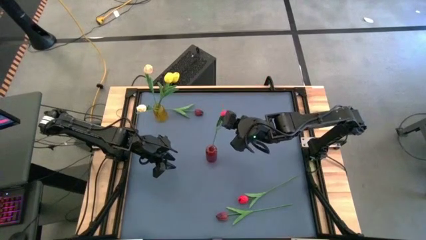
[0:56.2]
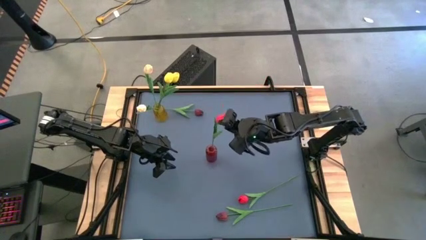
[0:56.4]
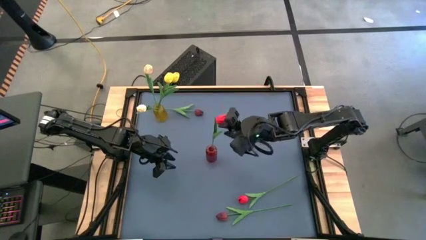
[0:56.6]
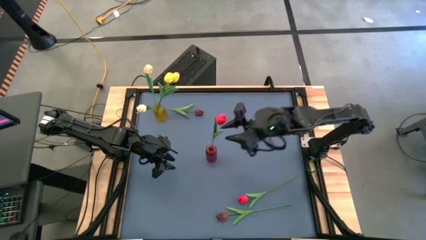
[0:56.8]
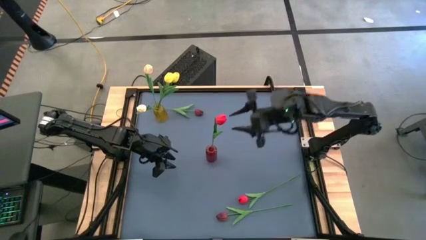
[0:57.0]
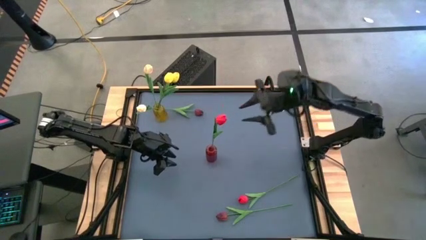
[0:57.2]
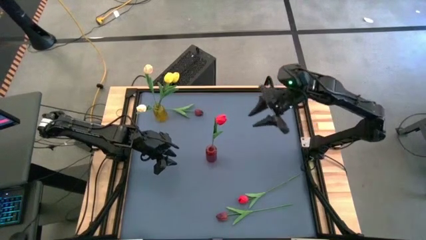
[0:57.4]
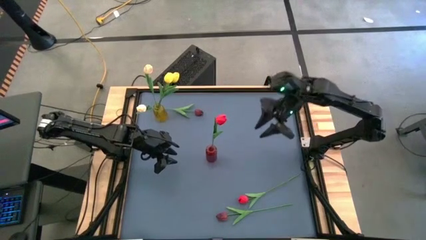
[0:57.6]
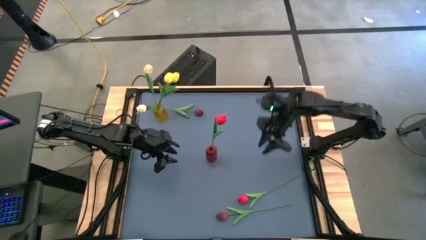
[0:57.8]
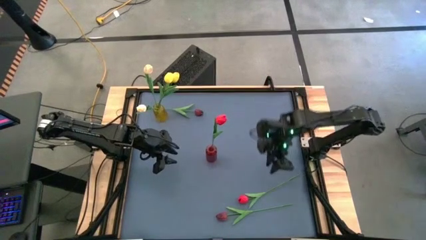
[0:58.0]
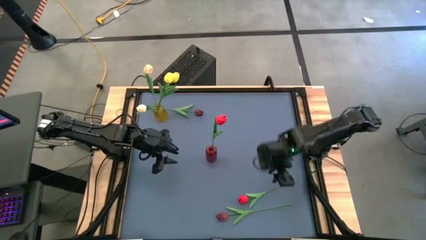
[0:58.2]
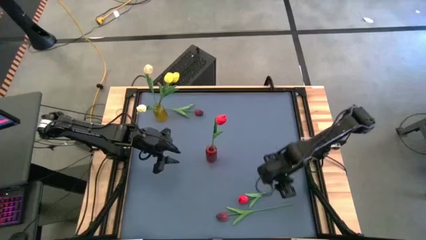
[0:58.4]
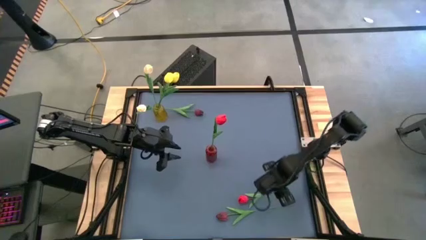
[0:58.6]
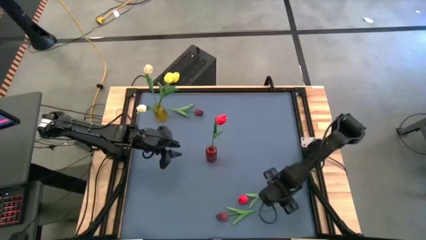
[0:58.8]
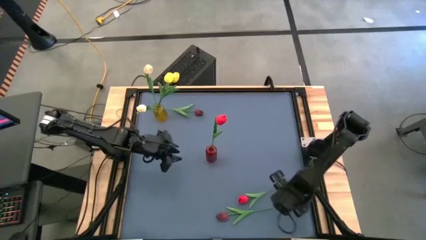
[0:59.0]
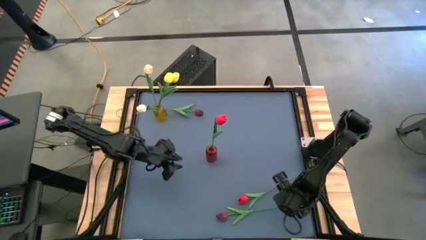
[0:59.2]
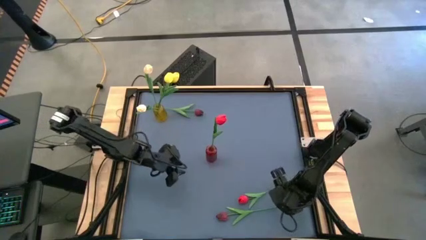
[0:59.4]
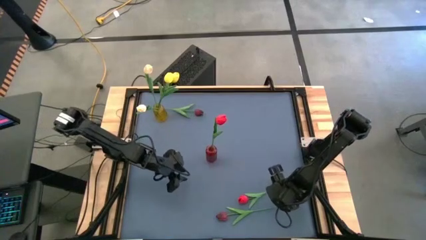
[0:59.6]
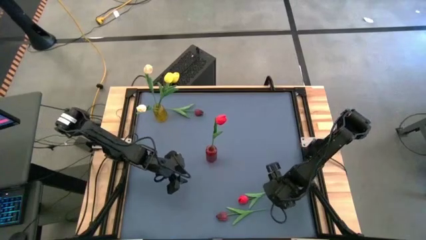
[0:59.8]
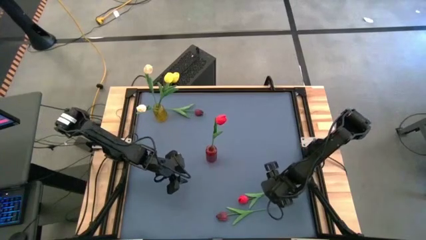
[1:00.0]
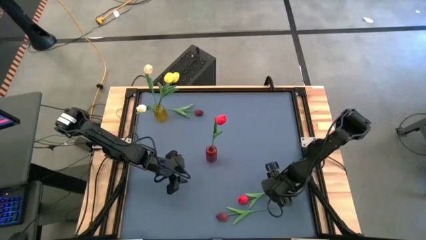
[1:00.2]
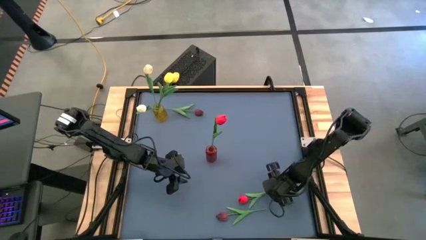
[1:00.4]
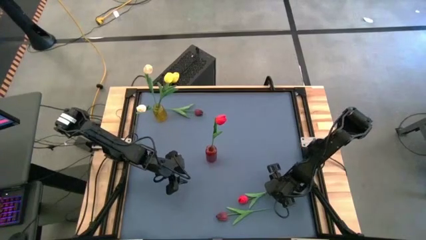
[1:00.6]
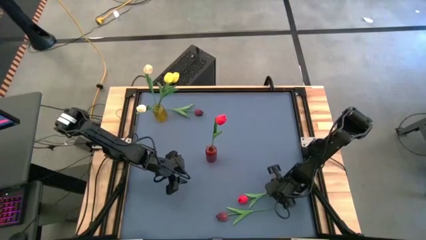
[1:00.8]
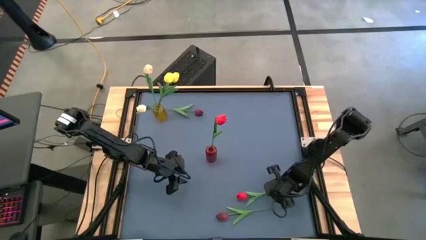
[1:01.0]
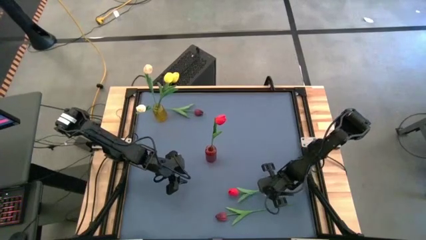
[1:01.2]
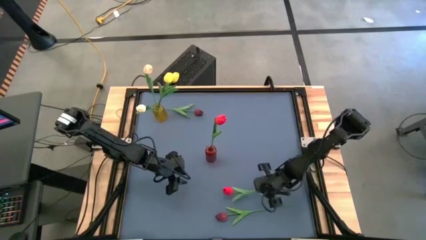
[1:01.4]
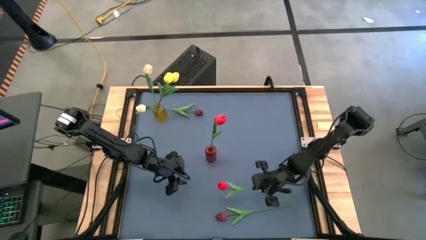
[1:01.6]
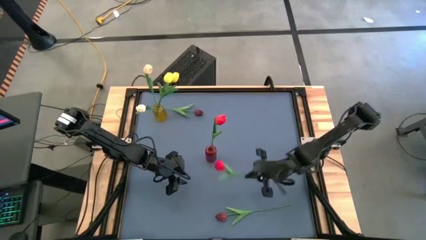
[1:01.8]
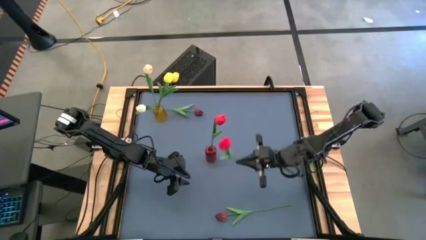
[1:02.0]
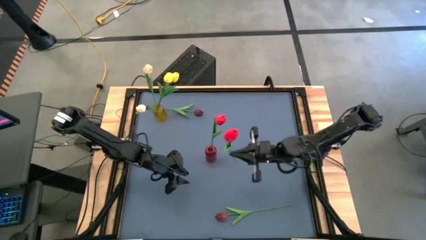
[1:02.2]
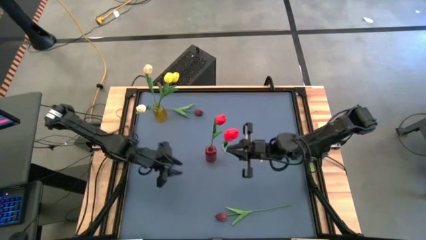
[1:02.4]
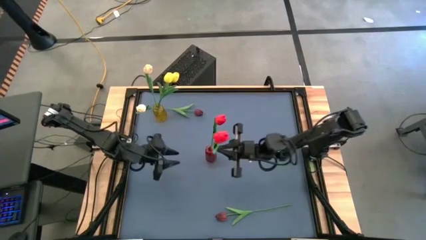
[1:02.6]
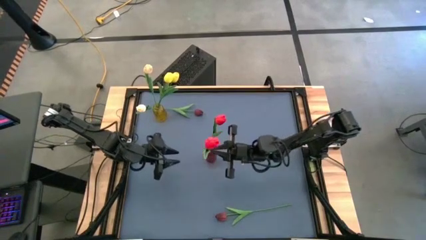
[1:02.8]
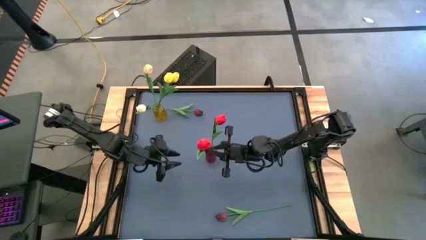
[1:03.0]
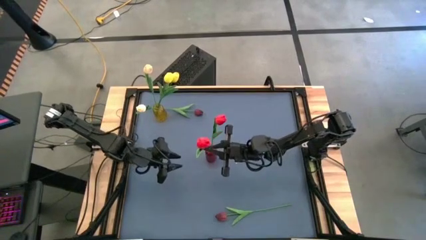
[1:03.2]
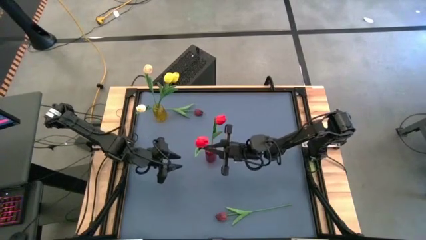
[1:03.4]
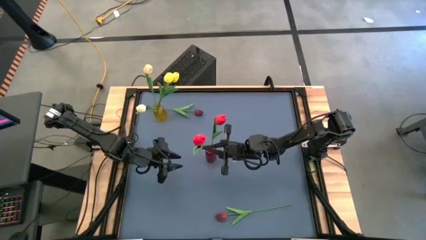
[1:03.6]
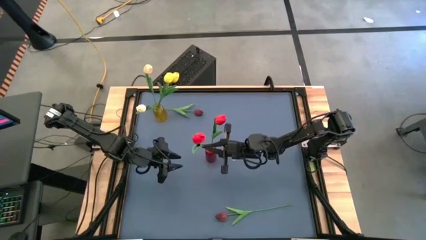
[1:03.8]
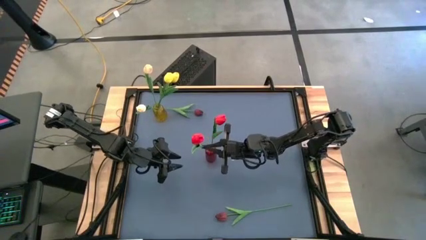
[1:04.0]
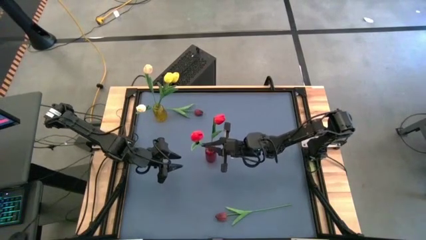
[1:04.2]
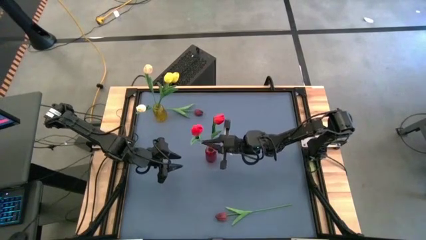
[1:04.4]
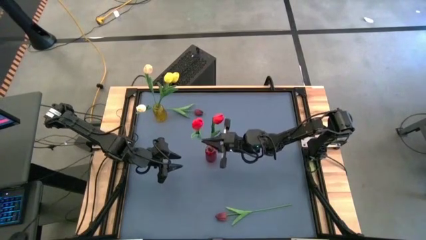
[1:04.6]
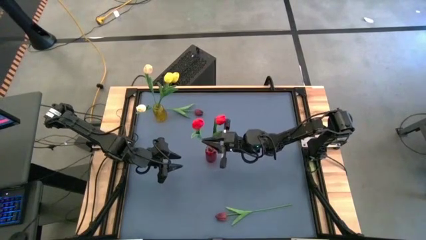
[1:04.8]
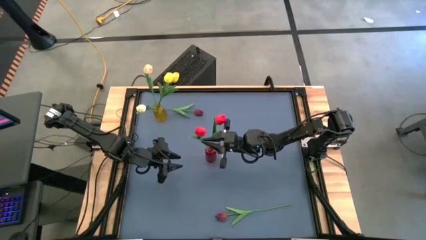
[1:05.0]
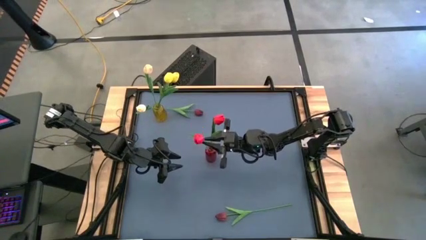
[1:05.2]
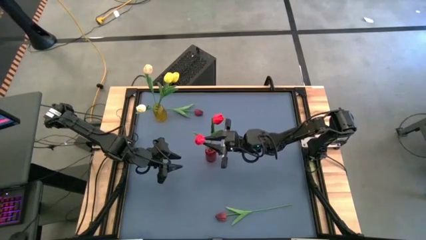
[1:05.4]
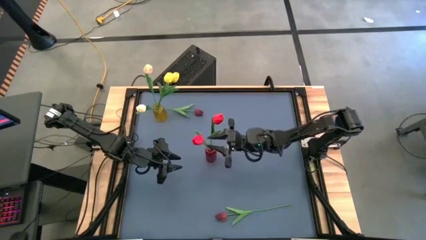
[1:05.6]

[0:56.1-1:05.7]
Task: Sort flowers into vase by color
Put the pink tulip into the red vase

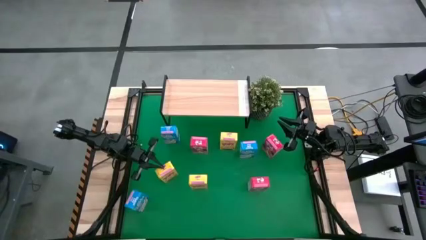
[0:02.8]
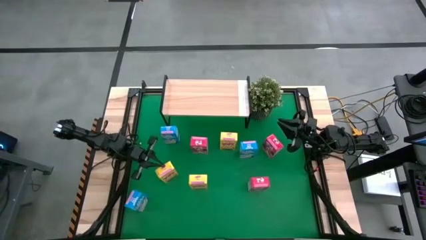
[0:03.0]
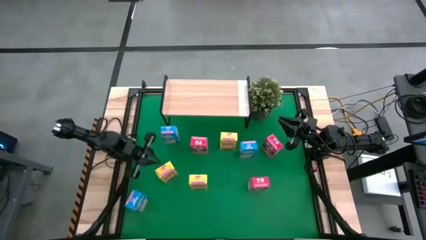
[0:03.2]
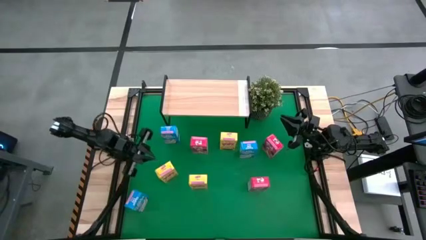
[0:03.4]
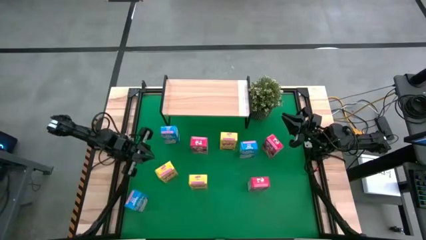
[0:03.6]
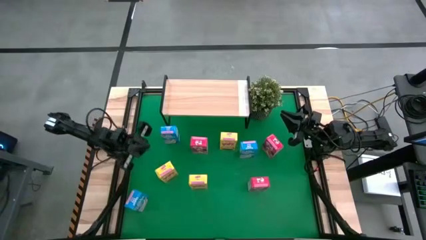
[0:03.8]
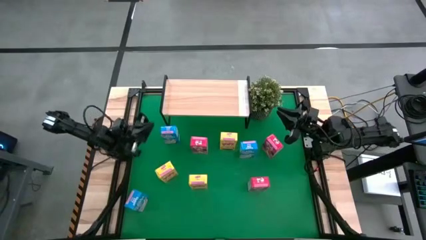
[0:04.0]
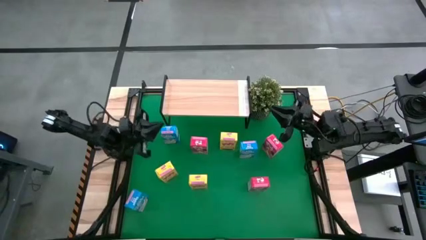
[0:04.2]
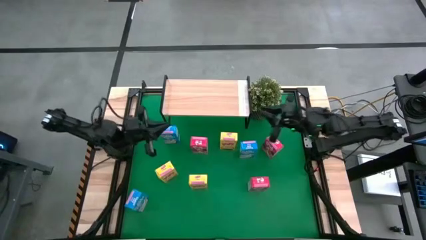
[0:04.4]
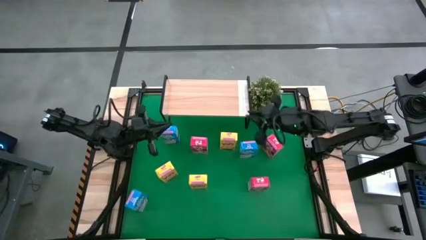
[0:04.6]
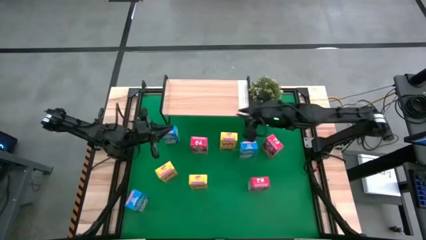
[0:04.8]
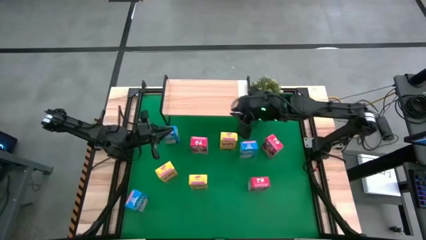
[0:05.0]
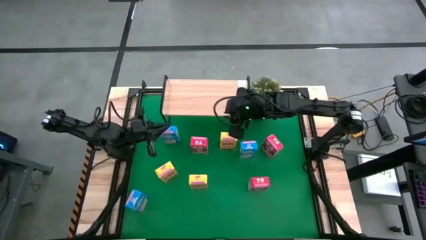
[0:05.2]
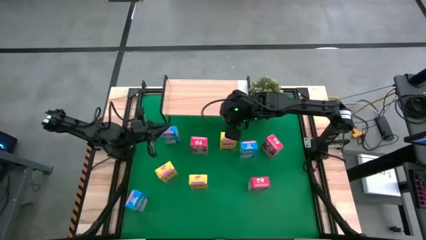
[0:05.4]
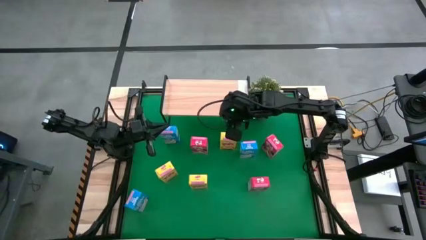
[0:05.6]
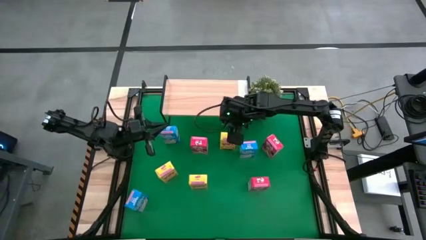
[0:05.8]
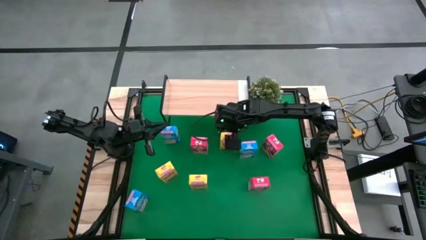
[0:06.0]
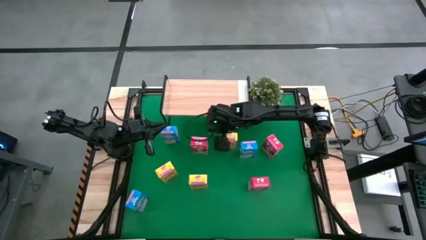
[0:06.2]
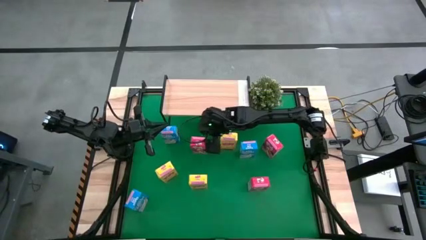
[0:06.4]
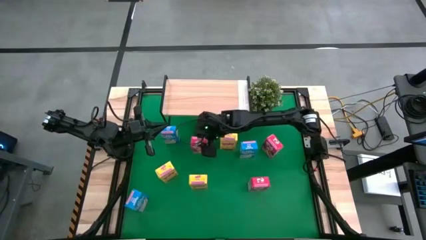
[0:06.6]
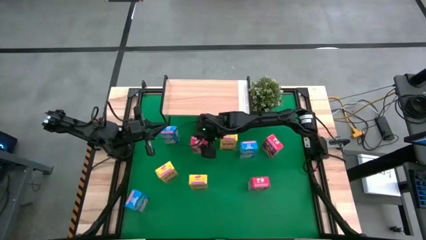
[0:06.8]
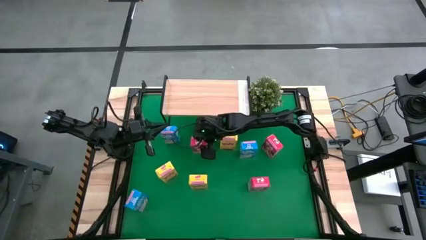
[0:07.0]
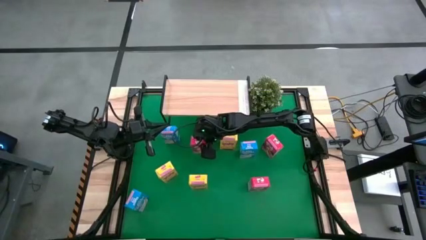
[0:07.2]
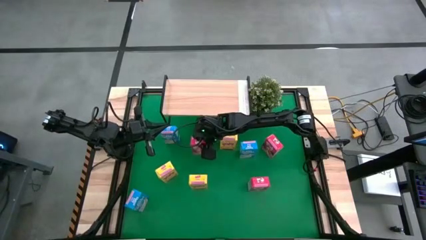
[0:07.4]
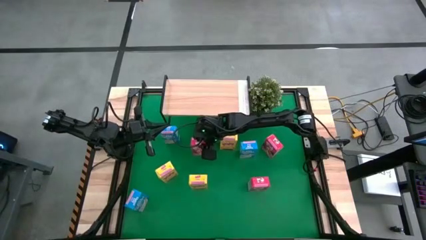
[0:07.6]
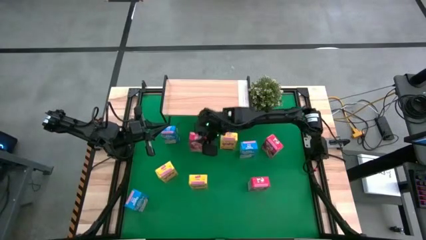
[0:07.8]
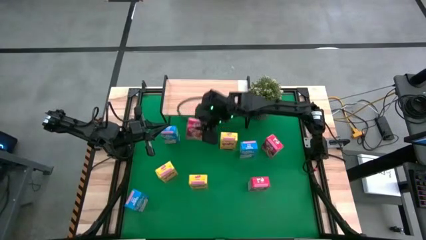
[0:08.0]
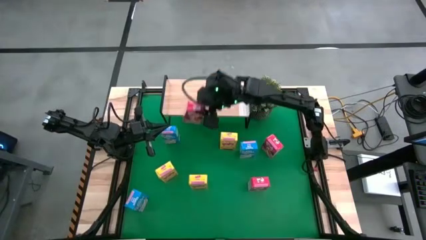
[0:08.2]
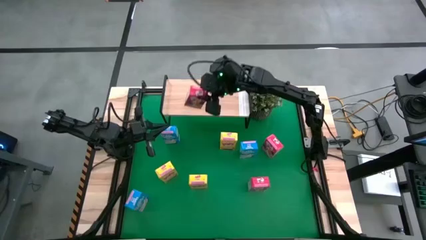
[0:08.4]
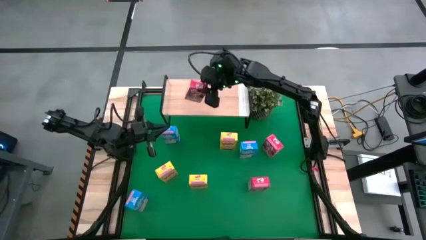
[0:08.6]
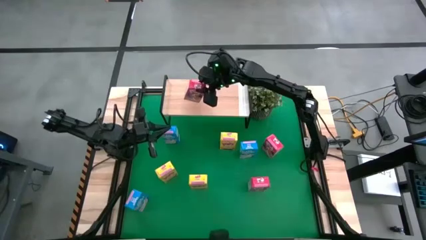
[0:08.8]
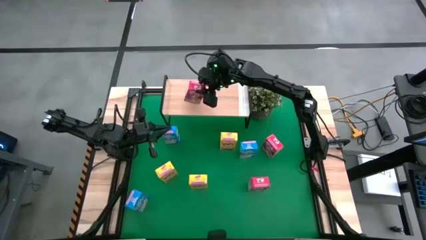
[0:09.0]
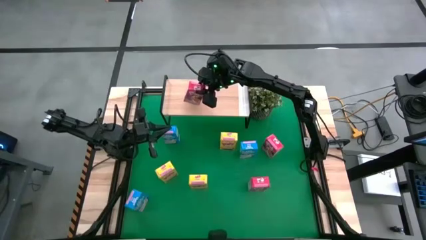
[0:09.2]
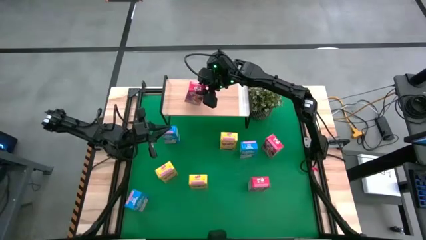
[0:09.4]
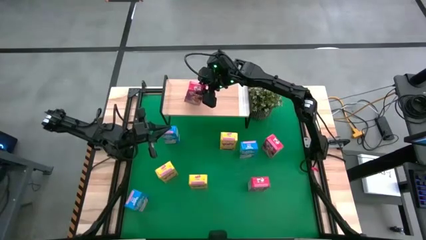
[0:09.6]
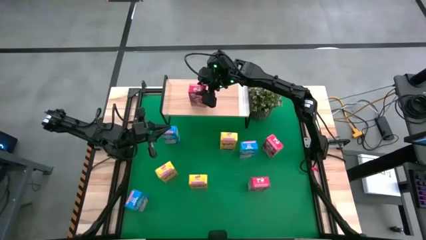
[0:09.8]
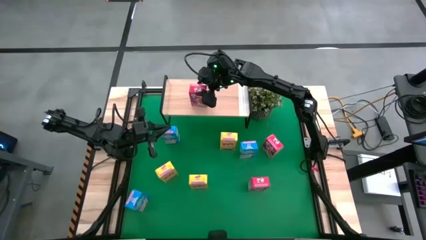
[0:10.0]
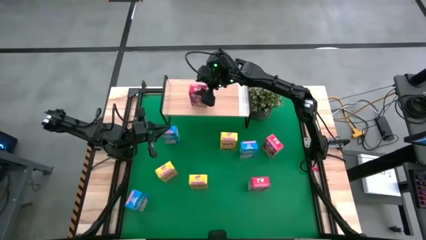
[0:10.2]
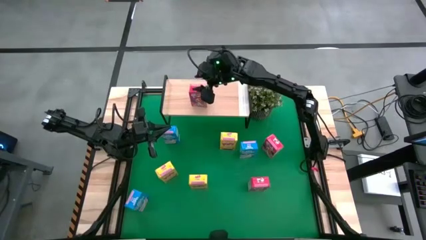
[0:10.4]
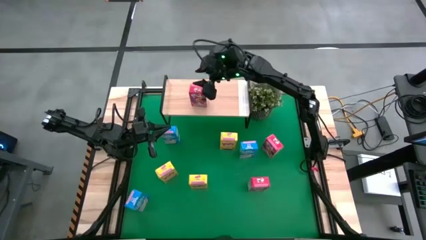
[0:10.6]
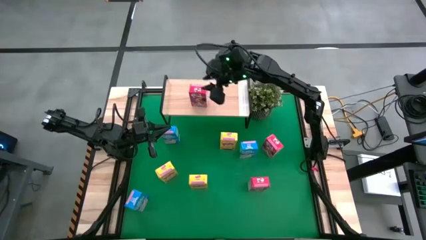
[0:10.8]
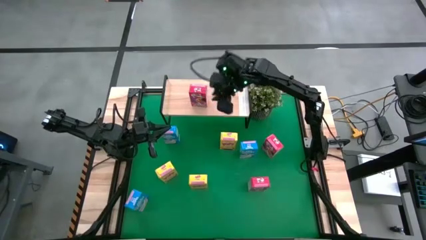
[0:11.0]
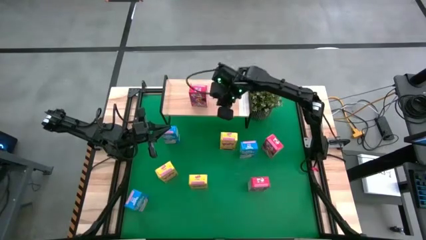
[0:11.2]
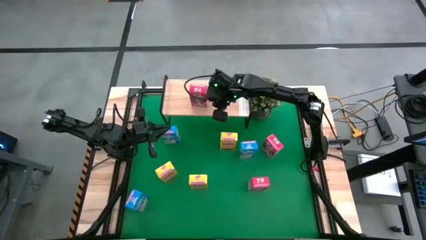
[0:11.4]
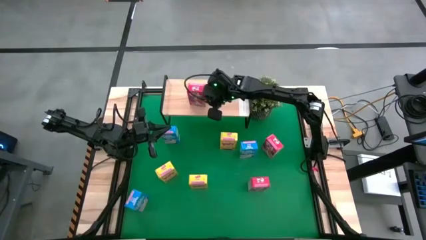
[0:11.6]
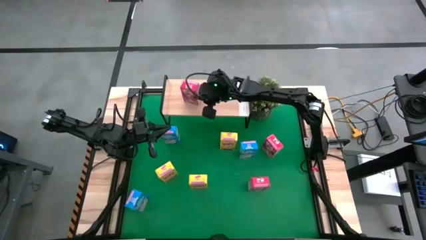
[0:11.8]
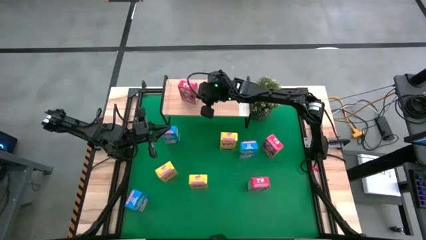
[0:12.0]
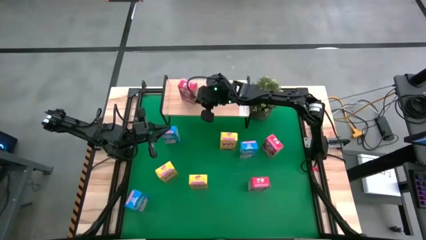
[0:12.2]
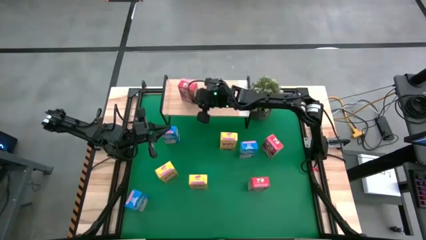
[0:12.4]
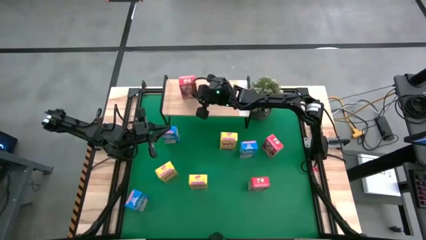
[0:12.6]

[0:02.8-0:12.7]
Task: Stack cereal on shelf
Put the top left red cereal box on the shelf
